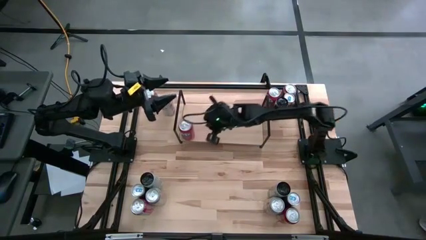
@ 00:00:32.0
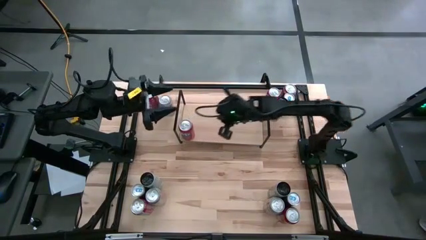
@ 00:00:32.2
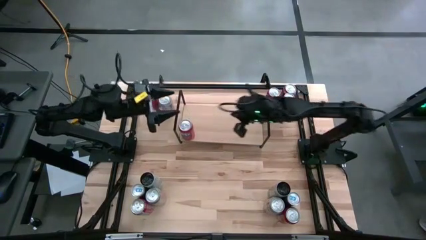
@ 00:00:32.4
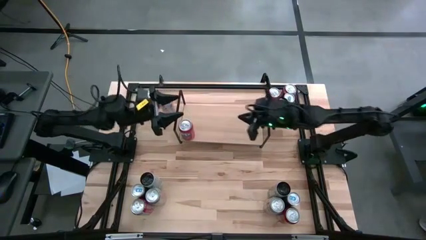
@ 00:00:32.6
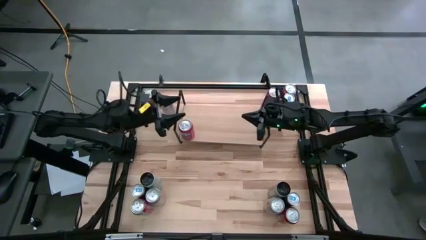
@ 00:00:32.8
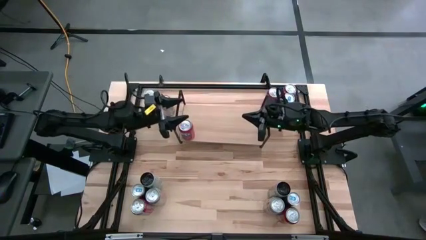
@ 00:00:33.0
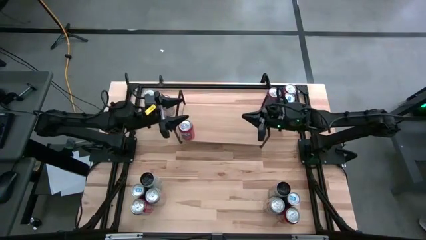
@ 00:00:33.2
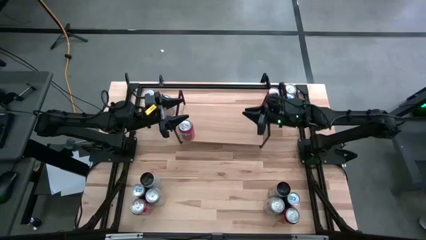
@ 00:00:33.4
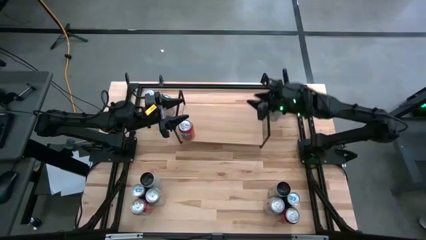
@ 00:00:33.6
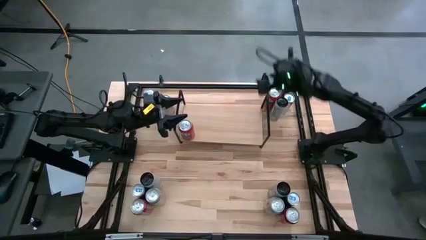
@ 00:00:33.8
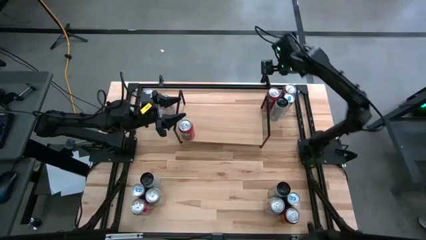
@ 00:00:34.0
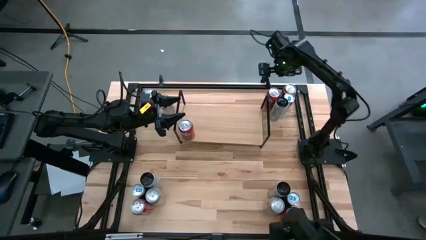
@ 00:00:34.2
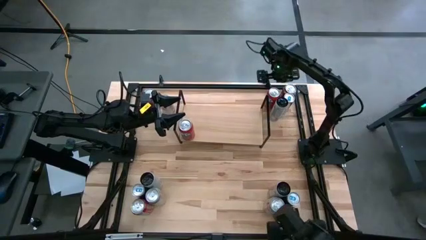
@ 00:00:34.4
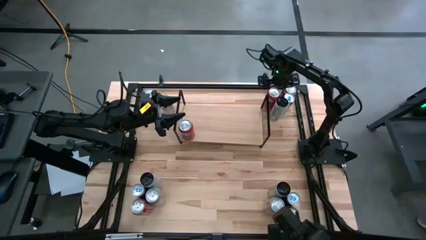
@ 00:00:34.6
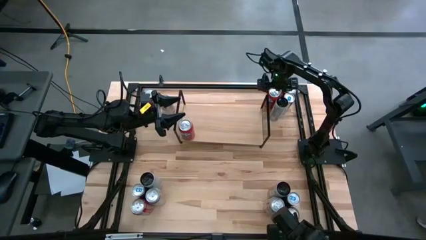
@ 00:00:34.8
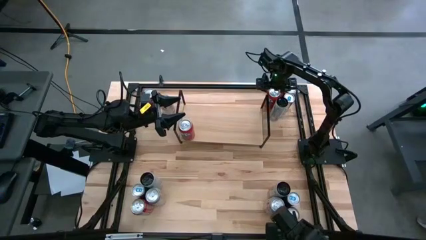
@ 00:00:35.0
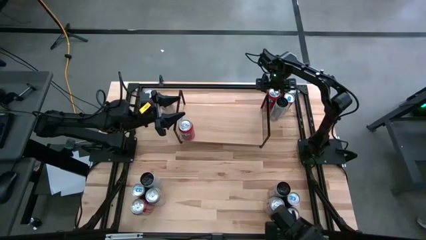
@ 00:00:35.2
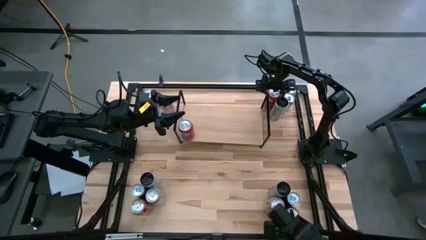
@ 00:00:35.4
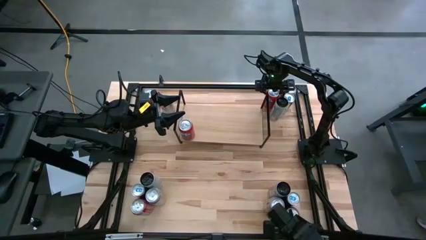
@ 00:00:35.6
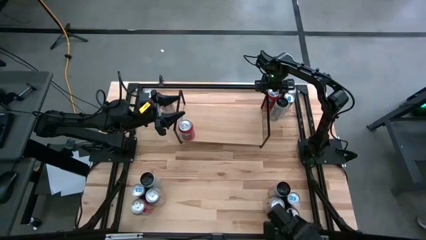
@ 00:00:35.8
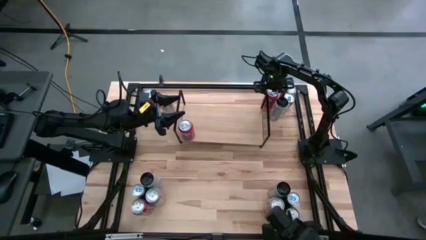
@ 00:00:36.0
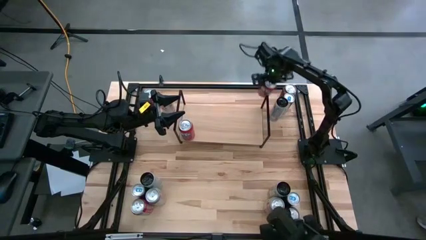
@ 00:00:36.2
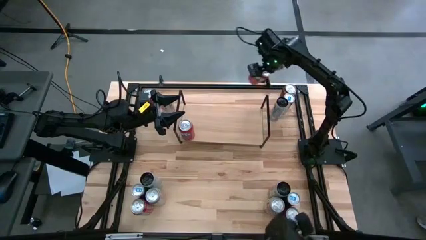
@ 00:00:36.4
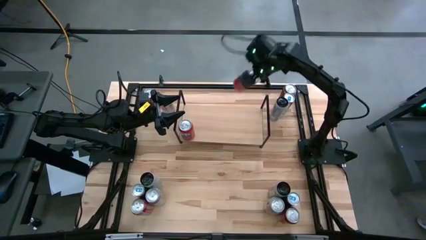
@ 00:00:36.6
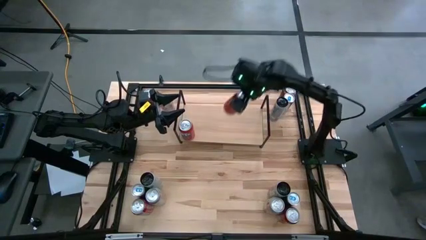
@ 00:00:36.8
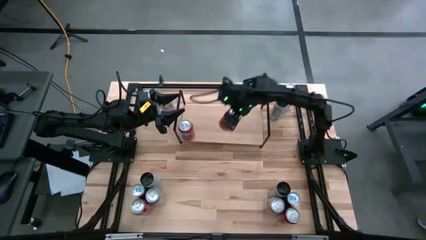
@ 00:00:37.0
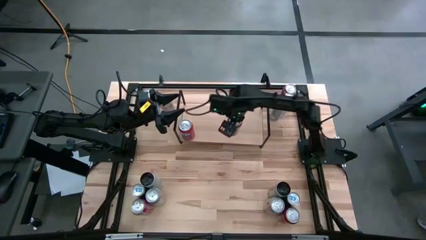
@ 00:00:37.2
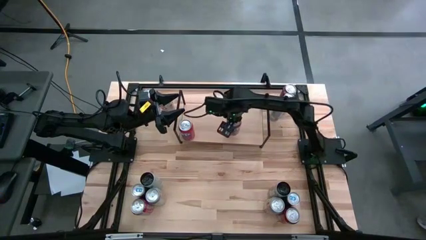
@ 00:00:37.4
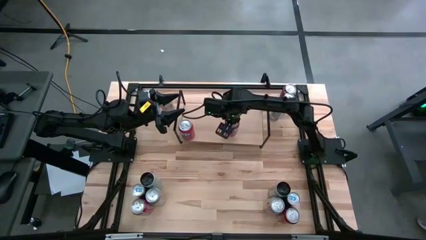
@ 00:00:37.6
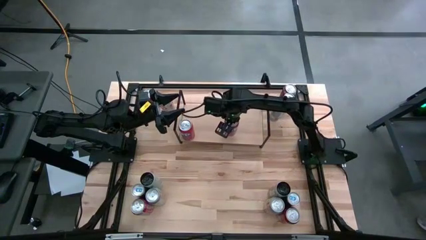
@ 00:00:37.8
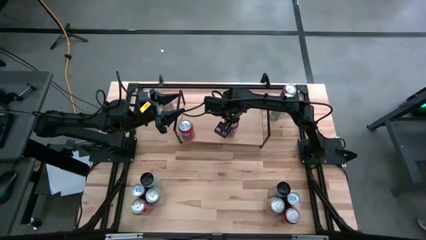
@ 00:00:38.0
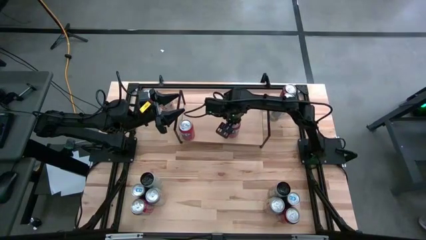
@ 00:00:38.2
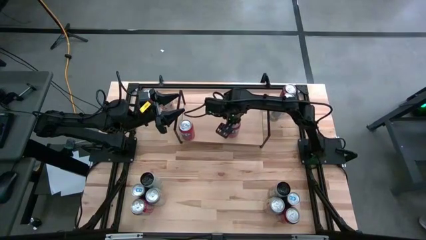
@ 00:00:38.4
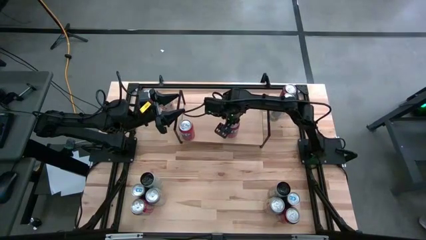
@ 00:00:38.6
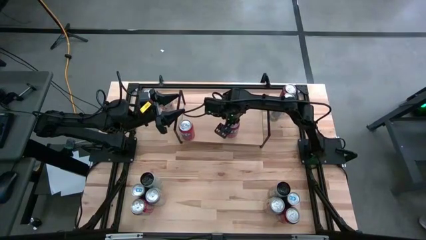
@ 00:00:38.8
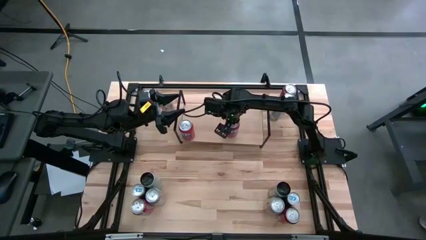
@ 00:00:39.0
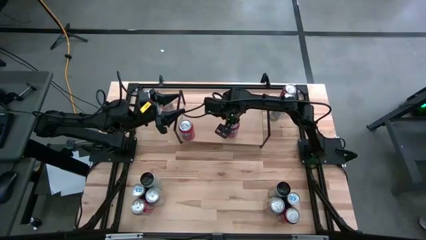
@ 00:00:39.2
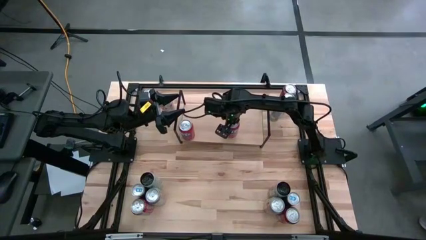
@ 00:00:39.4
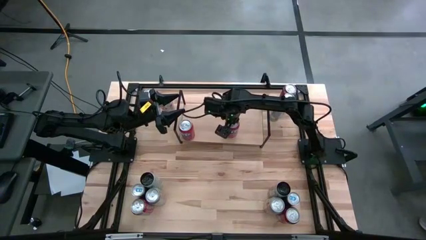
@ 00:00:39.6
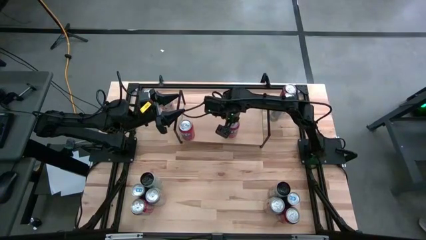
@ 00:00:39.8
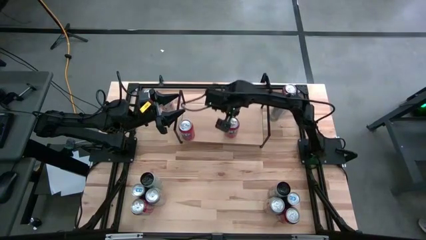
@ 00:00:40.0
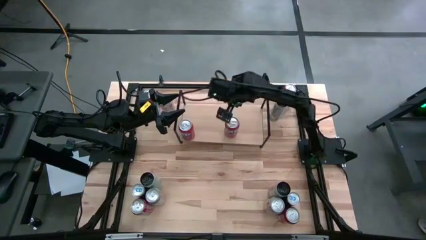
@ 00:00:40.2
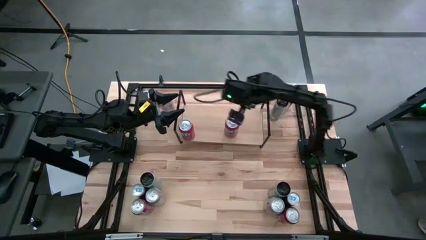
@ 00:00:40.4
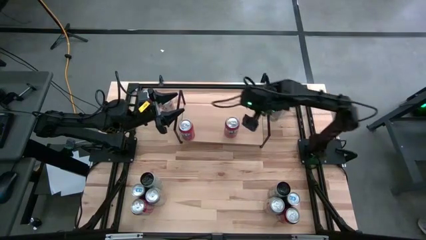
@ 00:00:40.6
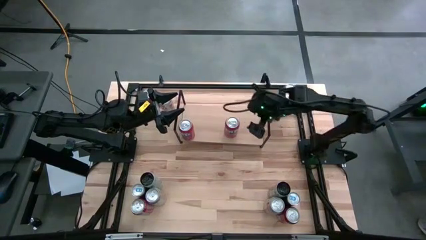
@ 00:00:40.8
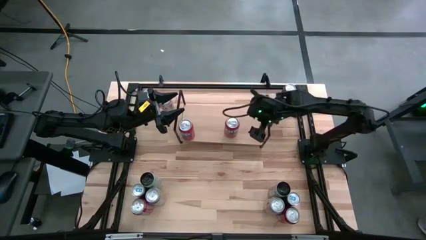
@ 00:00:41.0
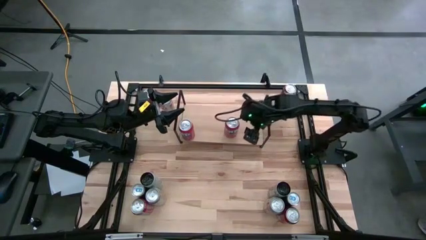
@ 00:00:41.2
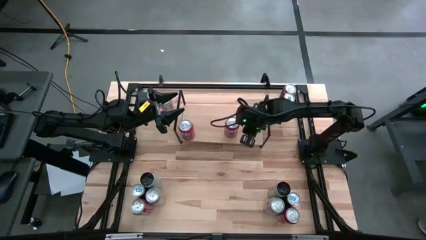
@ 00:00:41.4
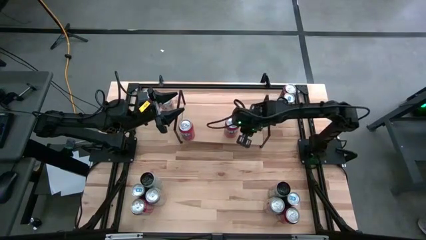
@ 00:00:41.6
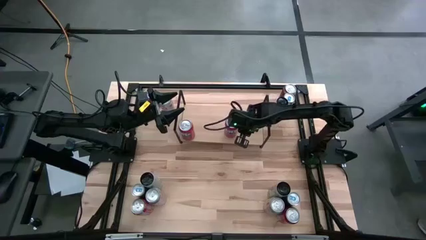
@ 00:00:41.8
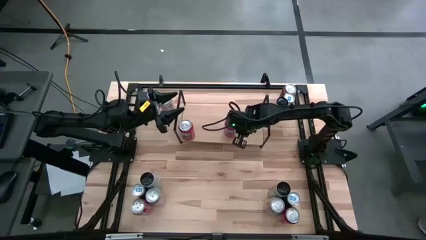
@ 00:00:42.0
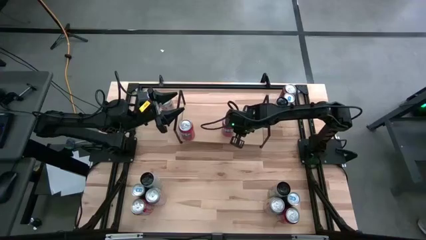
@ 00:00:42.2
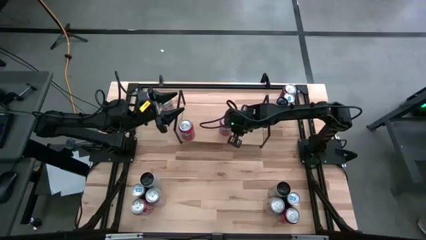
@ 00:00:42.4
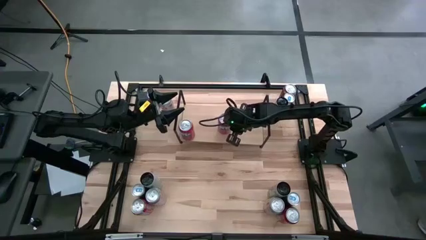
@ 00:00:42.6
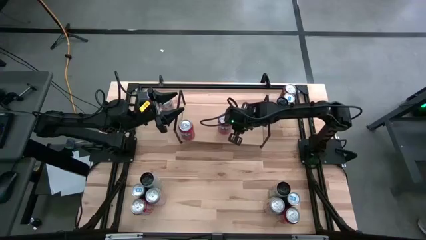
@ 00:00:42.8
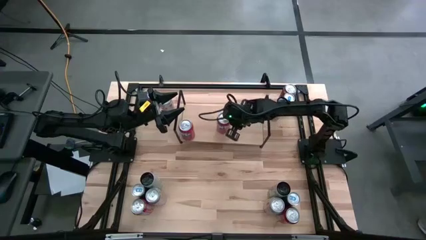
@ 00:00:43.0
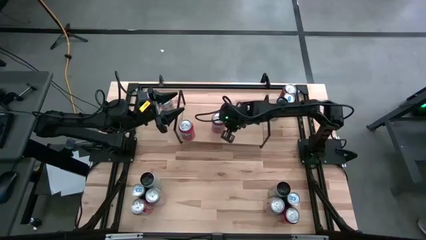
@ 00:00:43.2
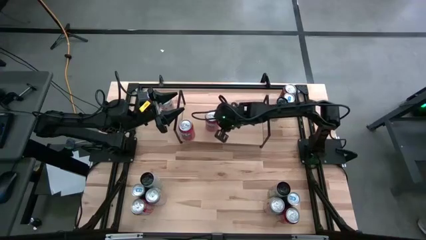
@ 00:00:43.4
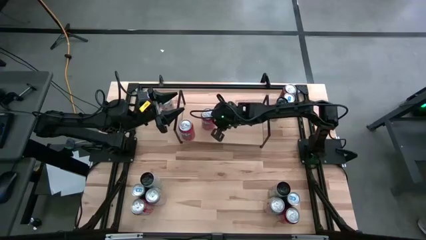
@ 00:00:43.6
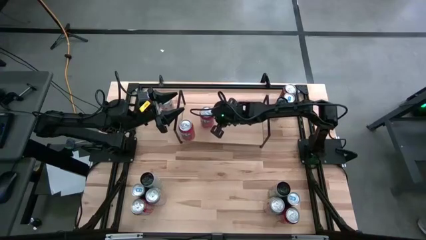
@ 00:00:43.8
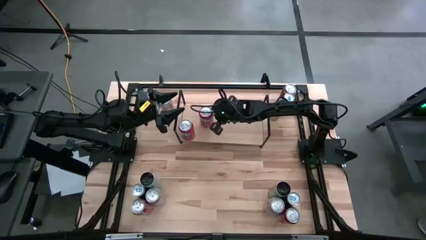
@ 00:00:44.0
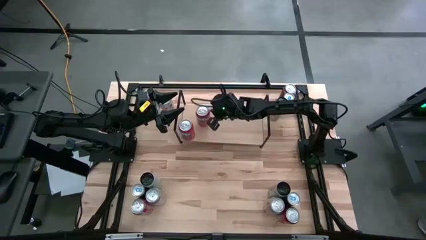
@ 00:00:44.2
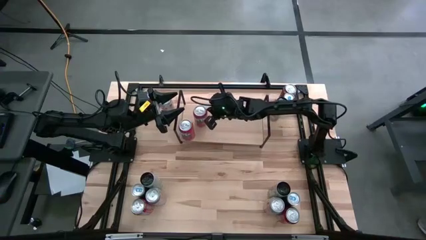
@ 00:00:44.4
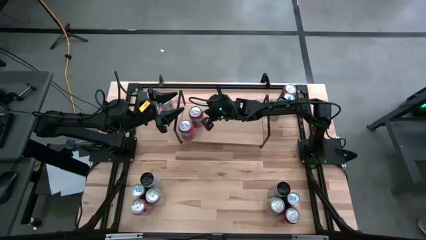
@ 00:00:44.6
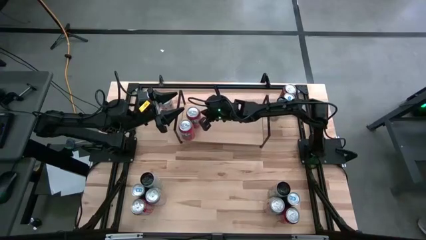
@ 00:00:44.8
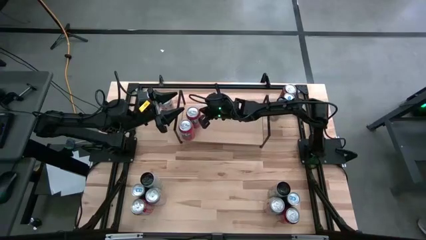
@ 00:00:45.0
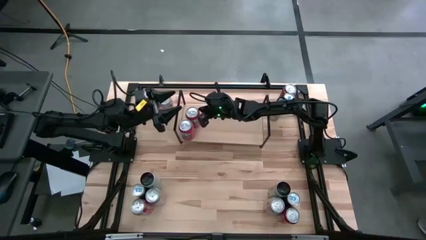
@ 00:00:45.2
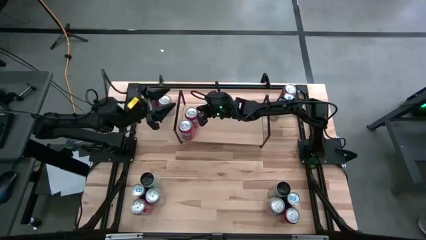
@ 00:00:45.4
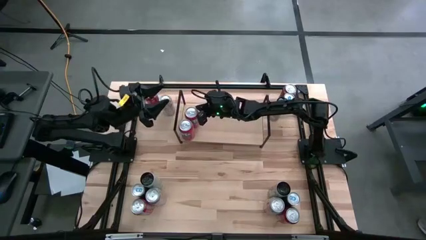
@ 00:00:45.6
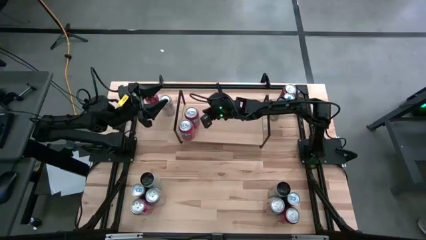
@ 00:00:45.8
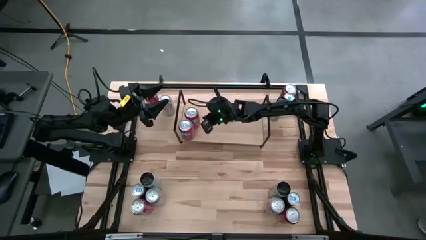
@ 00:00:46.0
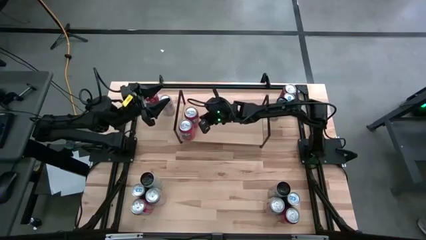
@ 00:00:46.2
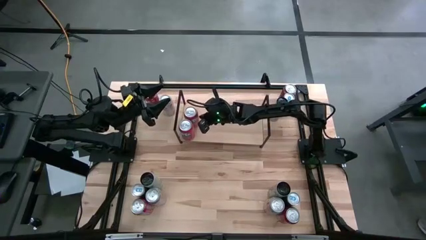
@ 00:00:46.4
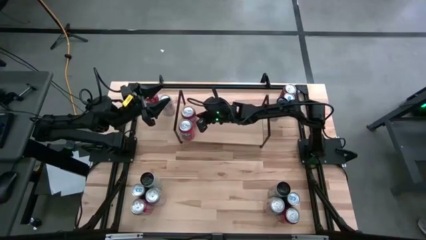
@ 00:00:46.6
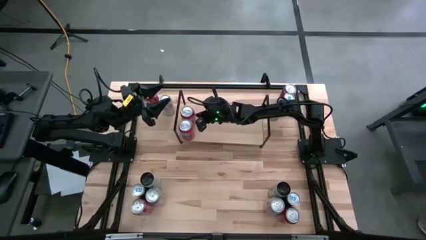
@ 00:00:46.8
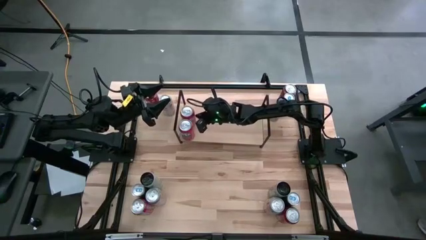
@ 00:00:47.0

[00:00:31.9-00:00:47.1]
Task: Place canned beverage on shelf
Put the red soda can on the shelf aligned with the other red soda can
